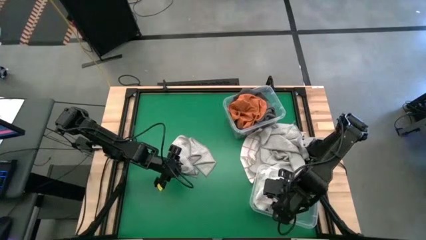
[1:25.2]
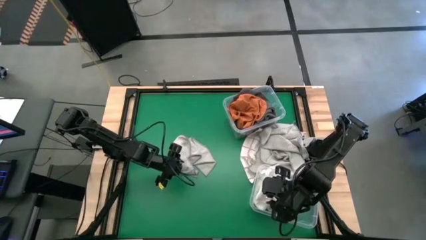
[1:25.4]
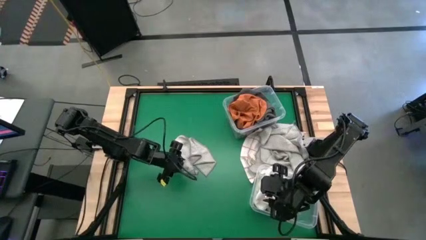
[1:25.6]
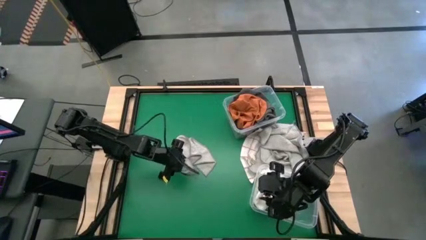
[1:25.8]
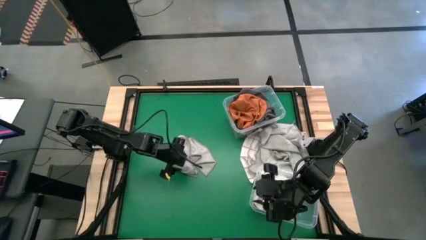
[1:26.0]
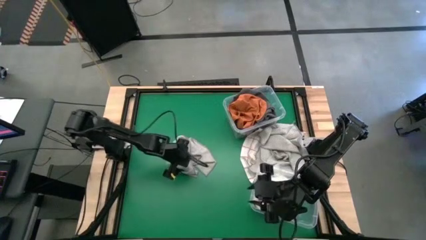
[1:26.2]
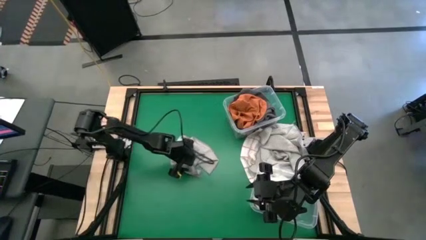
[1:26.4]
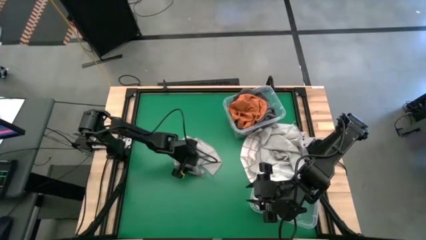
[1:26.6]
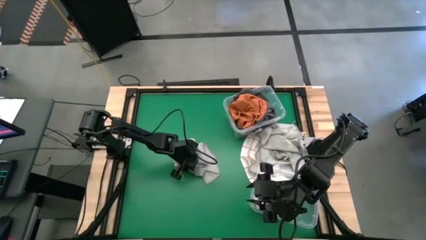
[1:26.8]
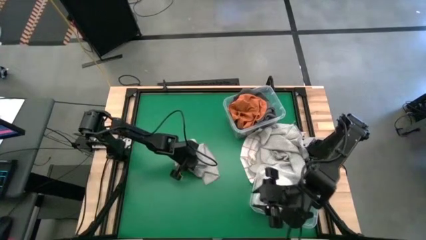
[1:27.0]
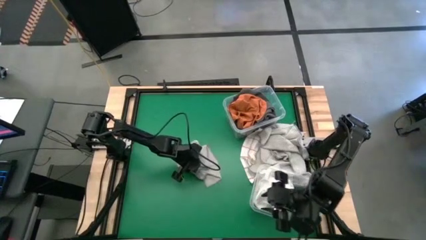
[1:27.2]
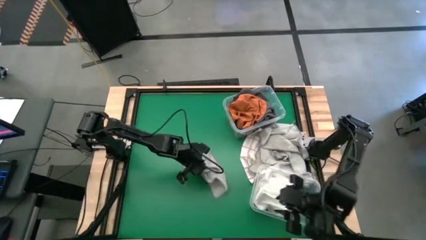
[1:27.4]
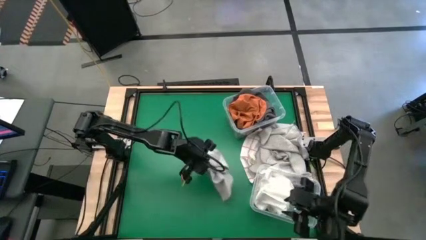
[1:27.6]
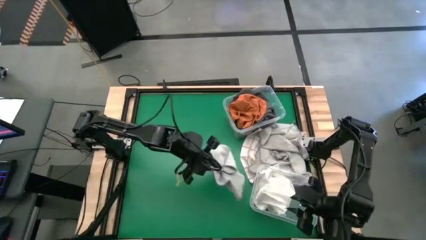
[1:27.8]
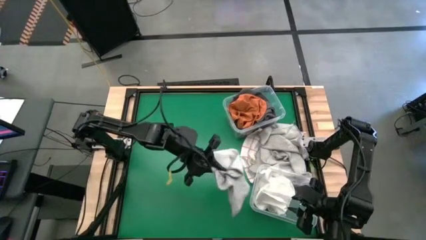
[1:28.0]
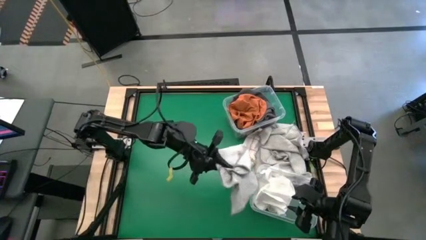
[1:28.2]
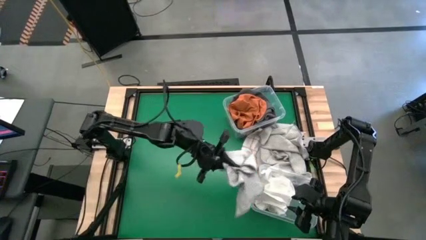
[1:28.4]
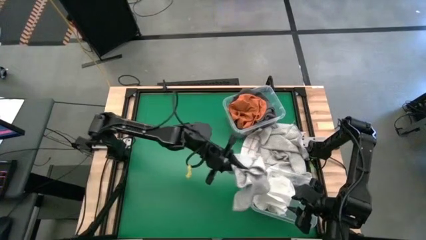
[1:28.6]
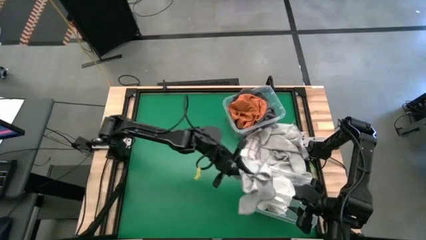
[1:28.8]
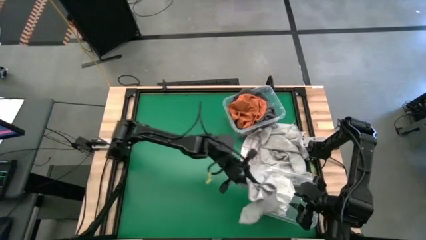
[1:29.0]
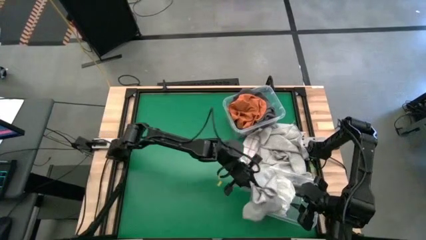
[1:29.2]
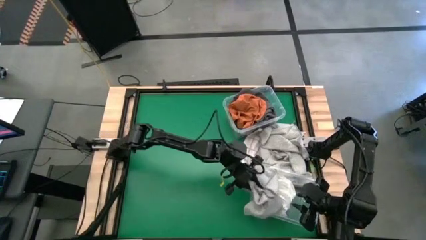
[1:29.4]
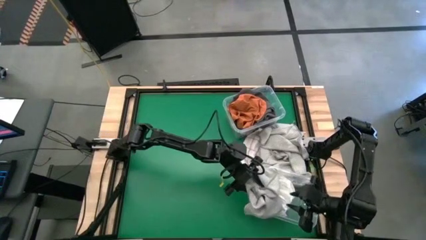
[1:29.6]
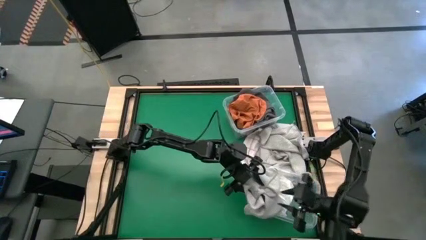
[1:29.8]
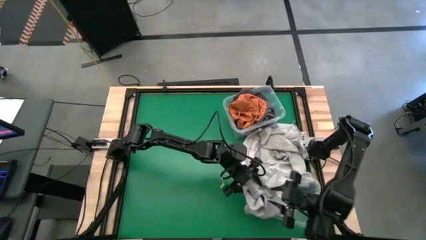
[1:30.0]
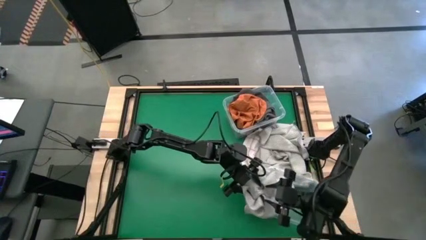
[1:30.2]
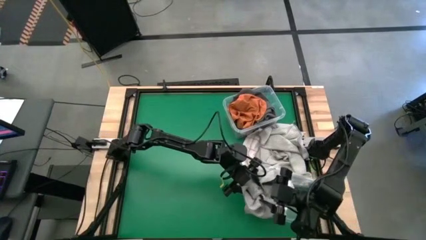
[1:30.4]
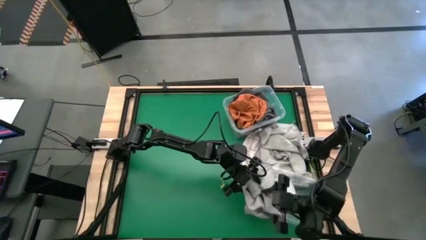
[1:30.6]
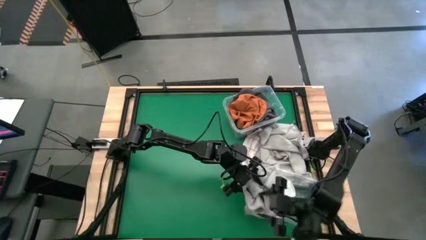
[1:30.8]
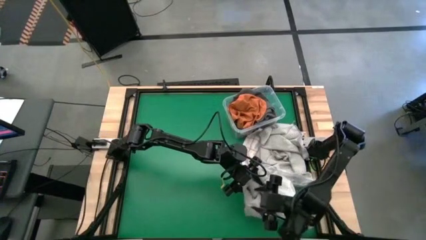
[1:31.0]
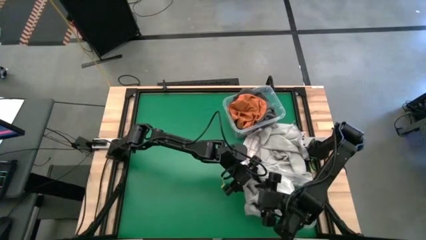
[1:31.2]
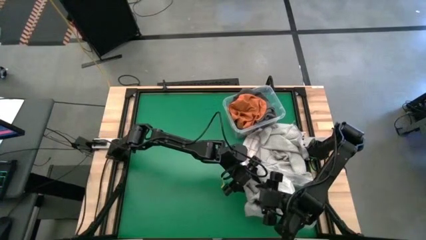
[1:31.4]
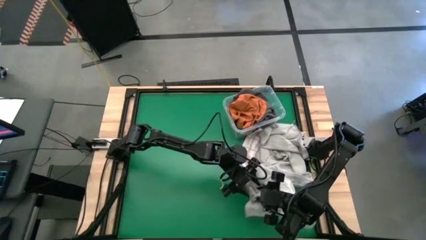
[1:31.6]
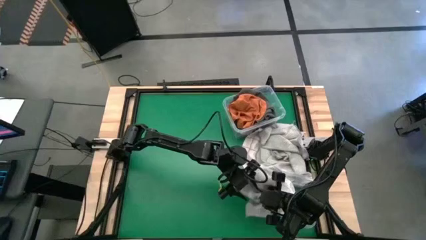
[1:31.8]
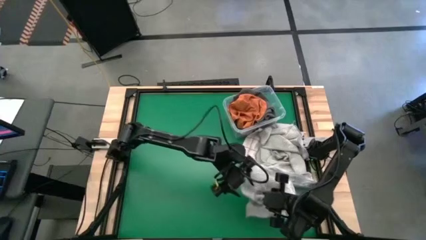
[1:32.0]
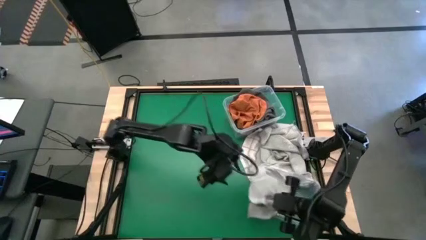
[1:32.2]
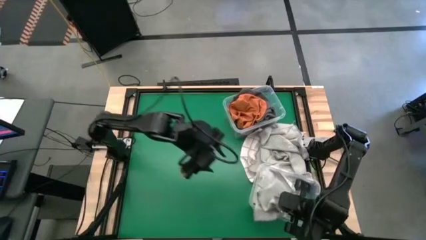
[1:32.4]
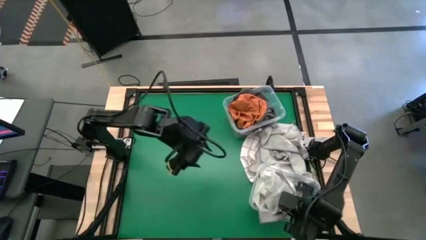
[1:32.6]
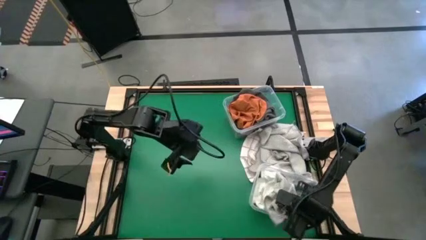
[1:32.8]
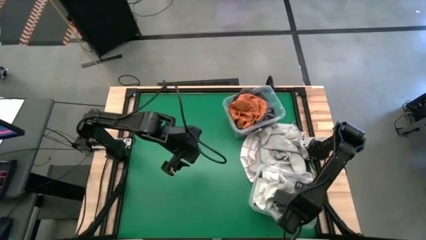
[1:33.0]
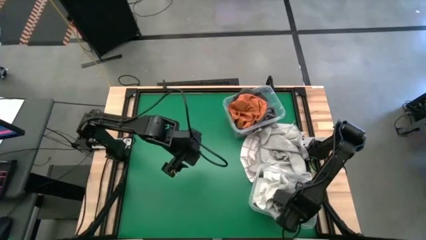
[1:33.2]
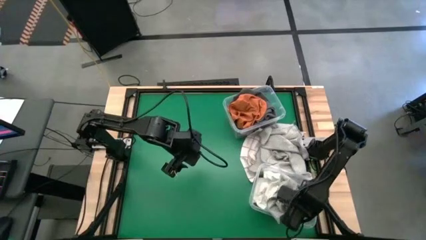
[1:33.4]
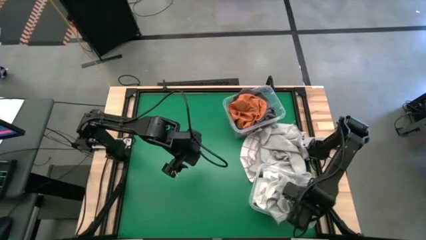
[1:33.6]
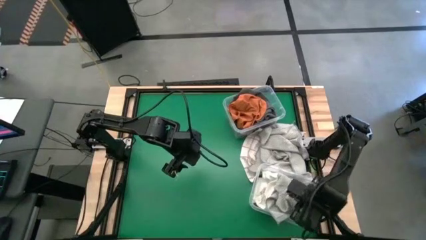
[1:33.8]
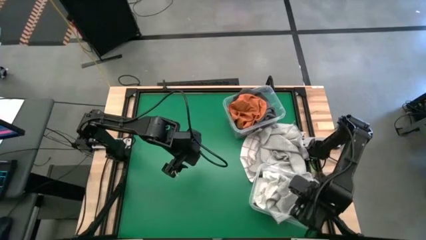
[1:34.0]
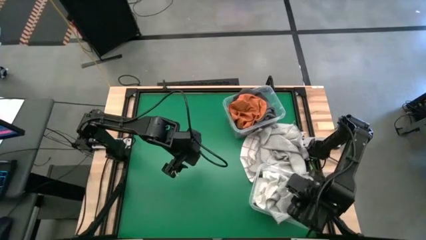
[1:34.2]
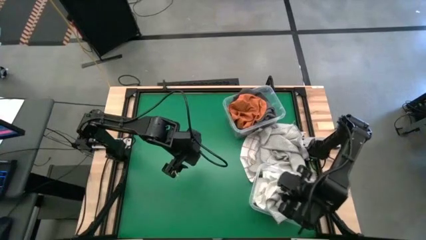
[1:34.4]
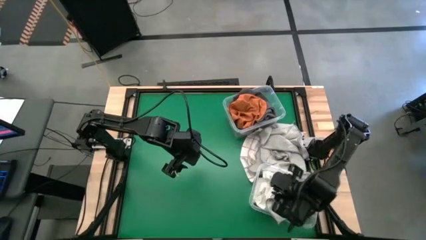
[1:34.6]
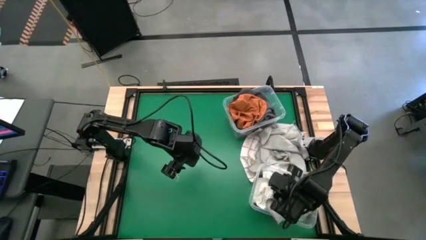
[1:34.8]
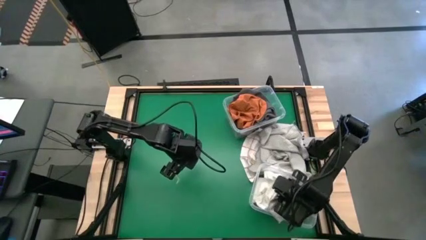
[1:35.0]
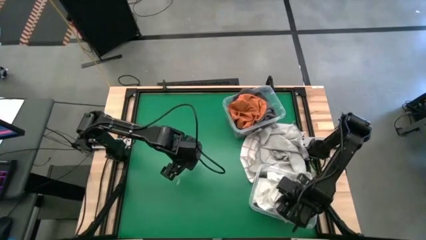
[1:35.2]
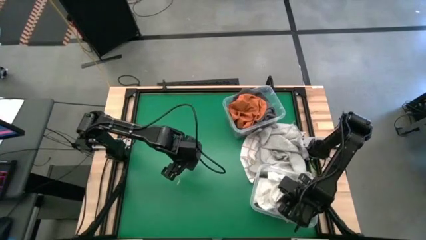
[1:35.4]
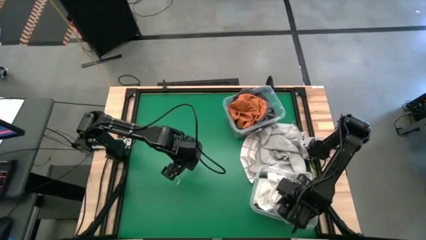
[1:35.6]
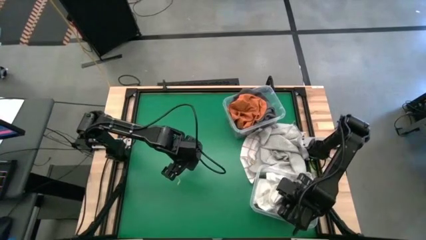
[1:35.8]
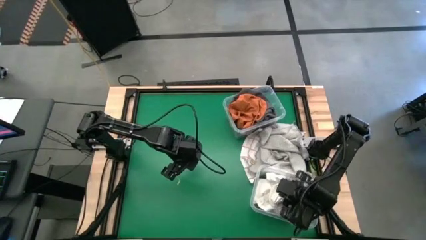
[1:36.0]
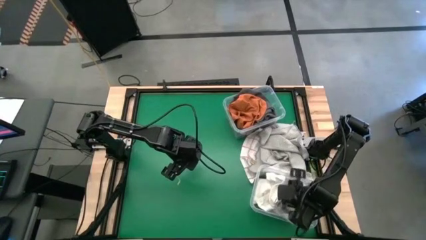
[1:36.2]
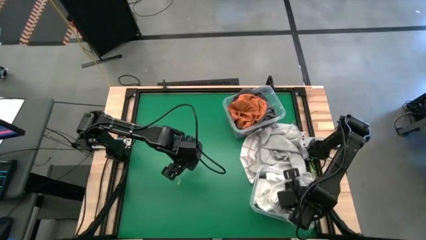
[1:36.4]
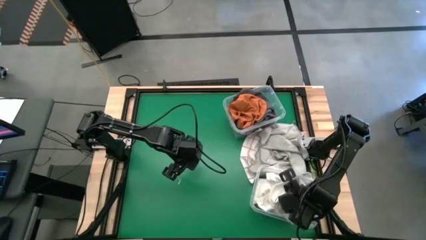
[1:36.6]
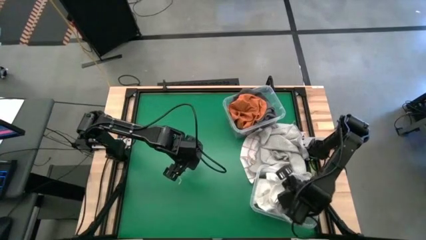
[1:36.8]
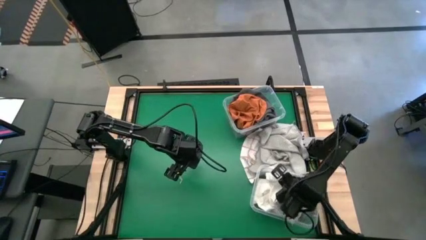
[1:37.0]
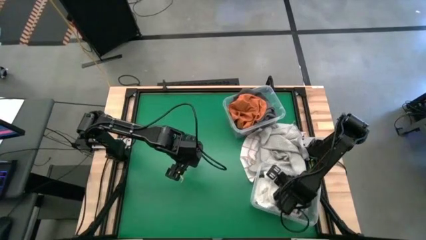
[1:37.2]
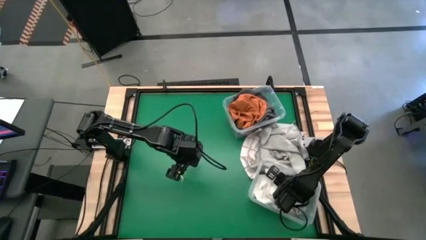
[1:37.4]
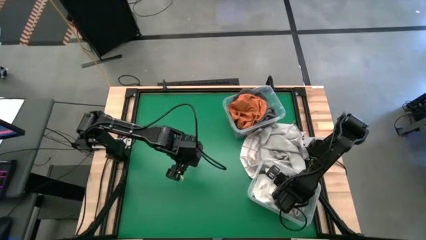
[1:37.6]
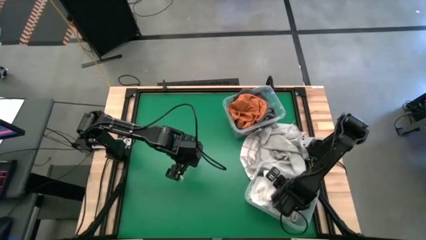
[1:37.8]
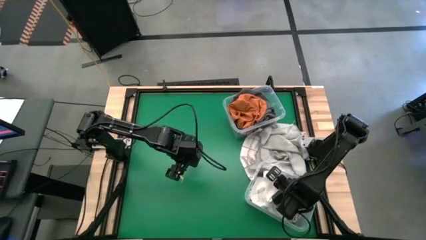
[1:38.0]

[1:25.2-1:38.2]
Task: Sort towels by color in basket
Put the light gray towel into the bottom transparent bin

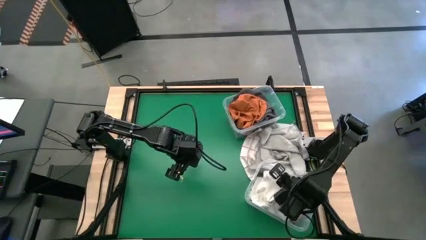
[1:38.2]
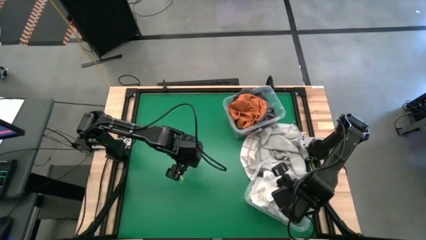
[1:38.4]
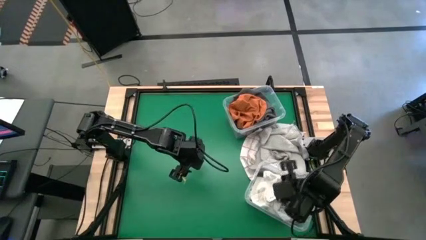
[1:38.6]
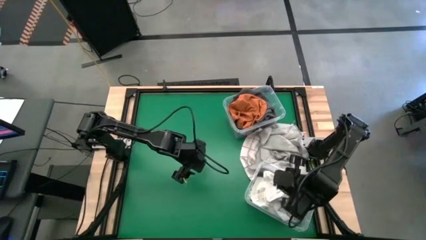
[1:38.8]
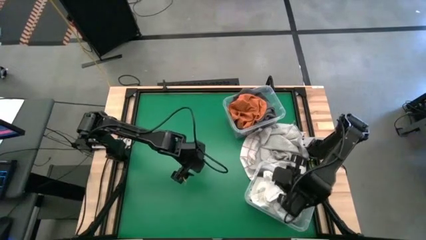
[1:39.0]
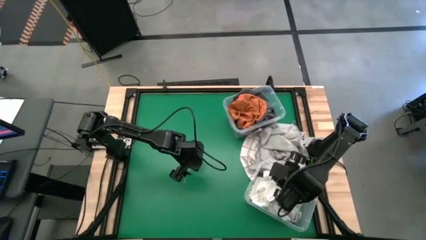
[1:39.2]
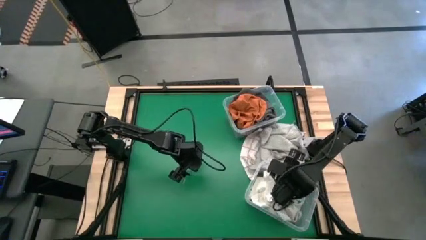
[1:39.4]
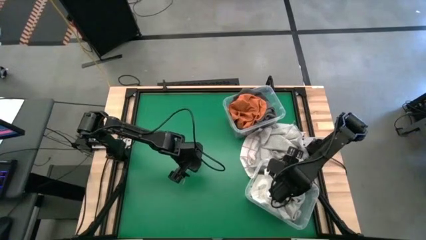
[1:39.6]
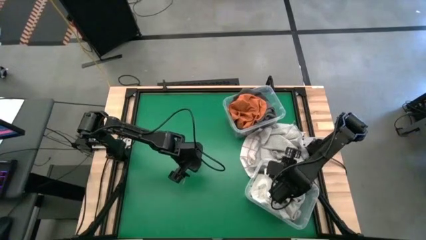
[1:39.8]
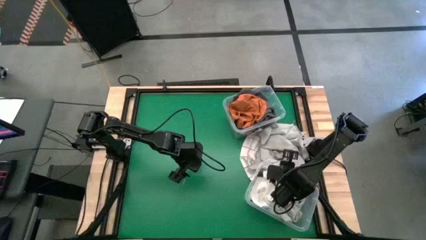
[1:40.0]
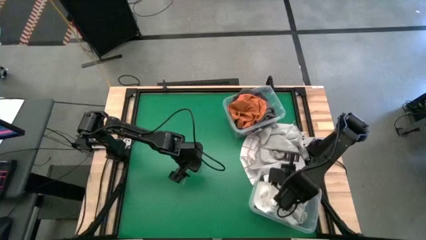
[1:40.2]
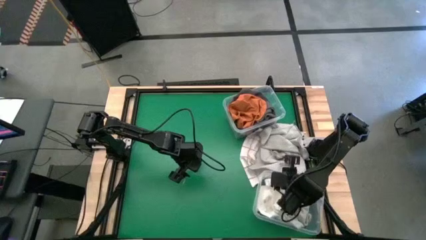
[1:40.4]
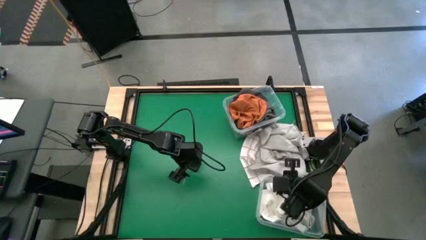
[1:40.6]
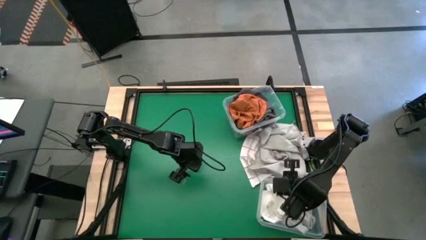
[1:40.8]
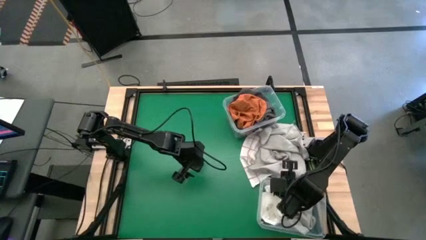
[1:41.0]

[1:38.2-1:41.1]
Adjust the bottom transparent bin
